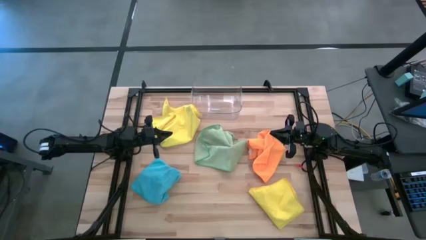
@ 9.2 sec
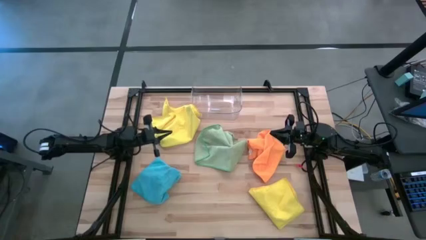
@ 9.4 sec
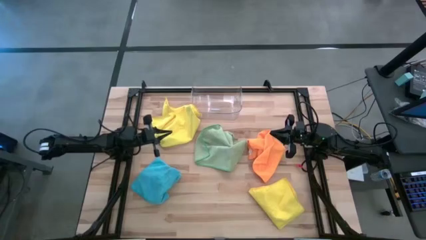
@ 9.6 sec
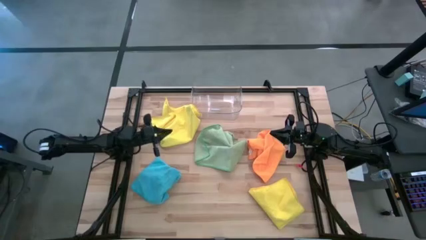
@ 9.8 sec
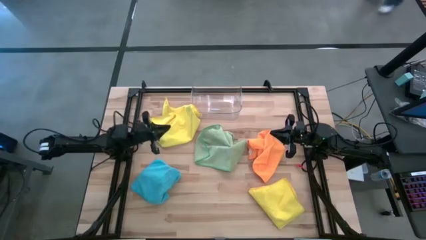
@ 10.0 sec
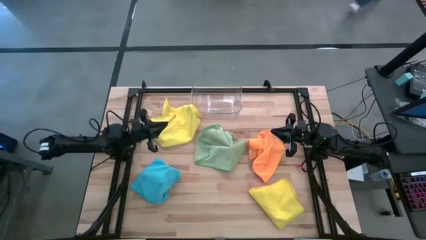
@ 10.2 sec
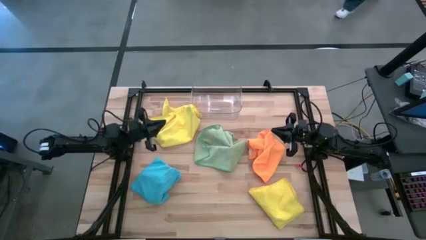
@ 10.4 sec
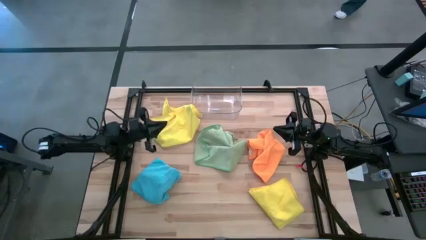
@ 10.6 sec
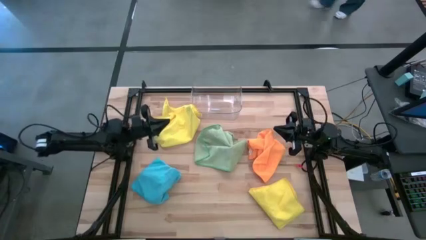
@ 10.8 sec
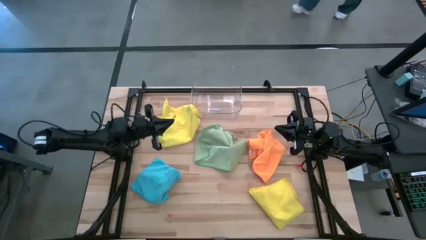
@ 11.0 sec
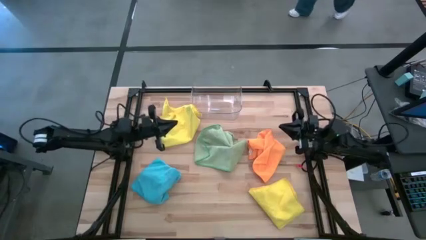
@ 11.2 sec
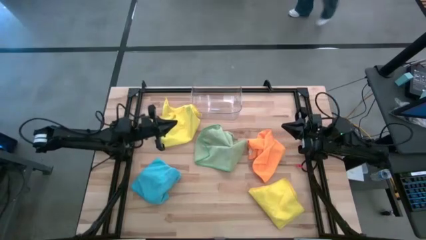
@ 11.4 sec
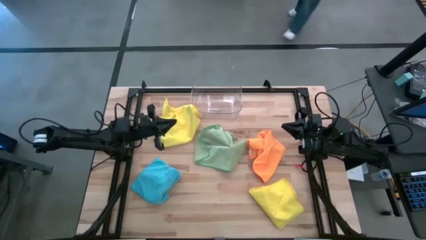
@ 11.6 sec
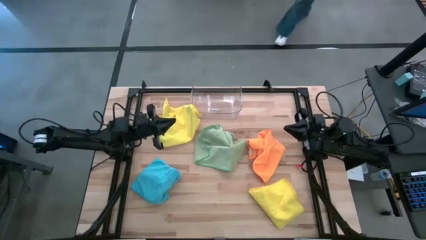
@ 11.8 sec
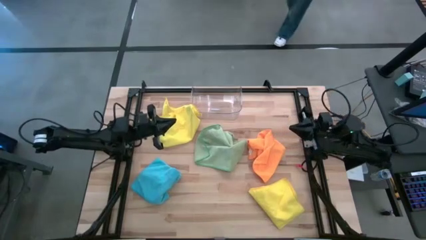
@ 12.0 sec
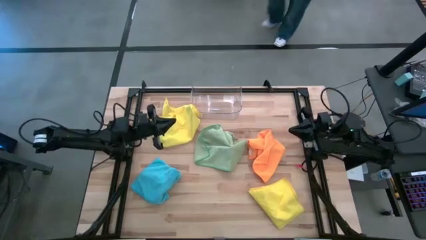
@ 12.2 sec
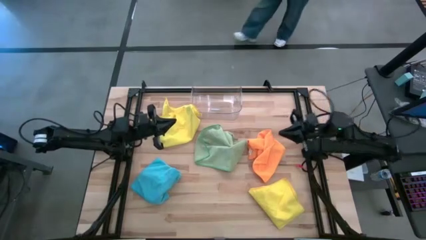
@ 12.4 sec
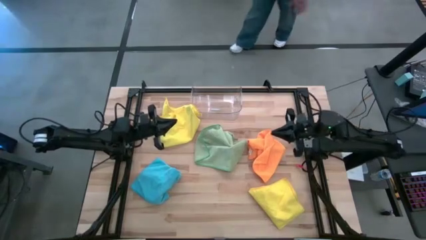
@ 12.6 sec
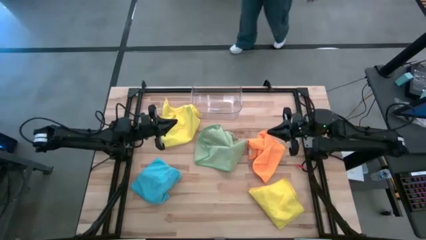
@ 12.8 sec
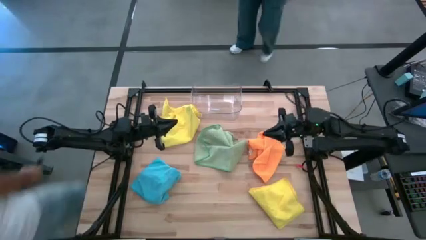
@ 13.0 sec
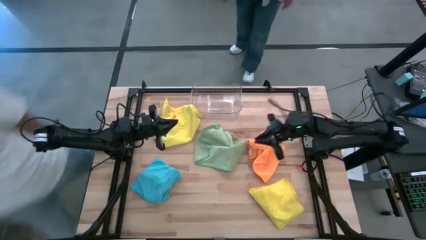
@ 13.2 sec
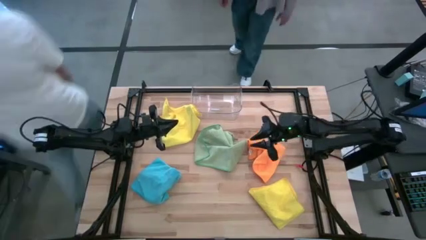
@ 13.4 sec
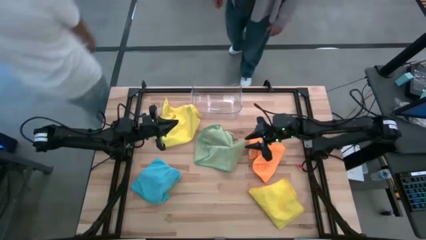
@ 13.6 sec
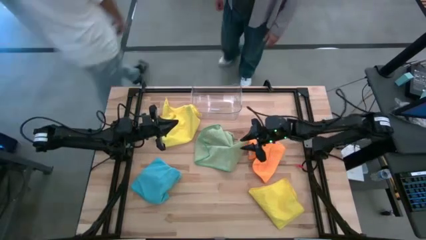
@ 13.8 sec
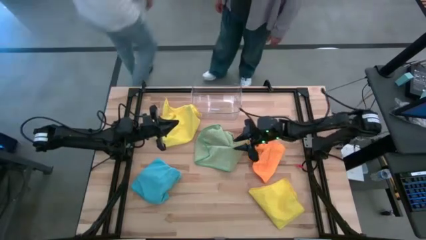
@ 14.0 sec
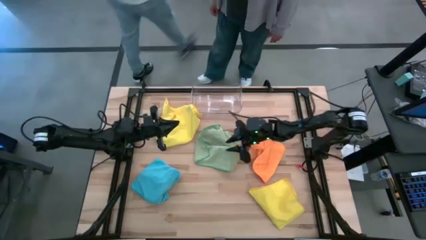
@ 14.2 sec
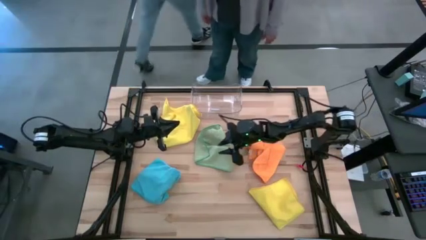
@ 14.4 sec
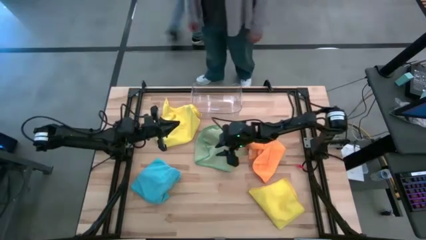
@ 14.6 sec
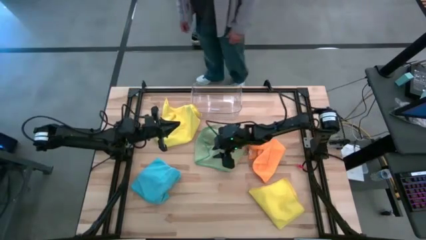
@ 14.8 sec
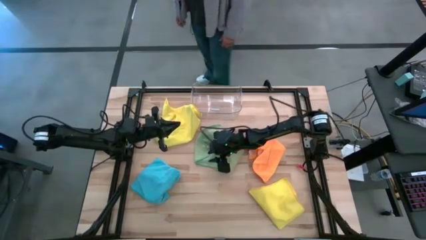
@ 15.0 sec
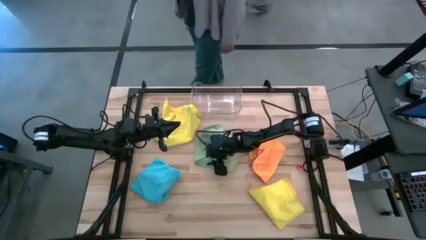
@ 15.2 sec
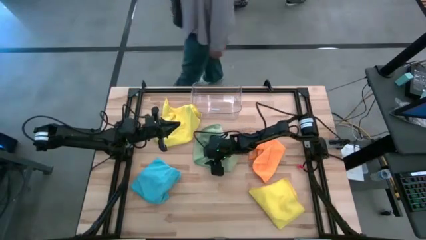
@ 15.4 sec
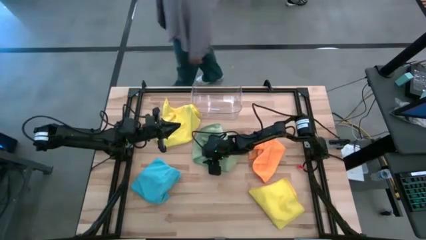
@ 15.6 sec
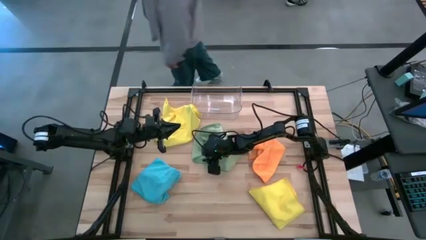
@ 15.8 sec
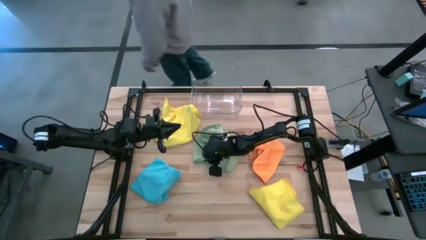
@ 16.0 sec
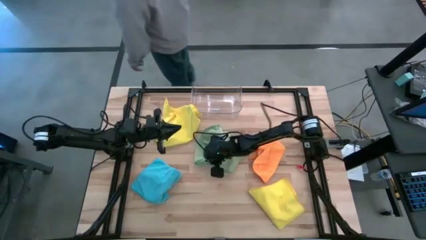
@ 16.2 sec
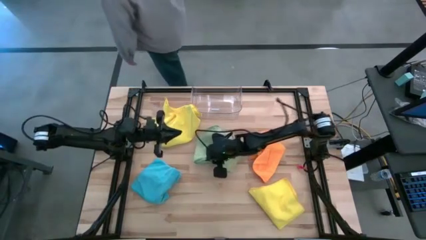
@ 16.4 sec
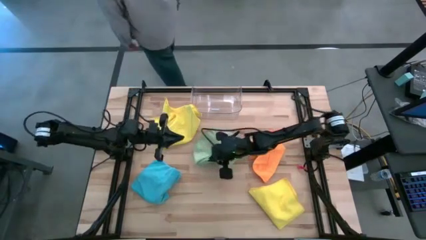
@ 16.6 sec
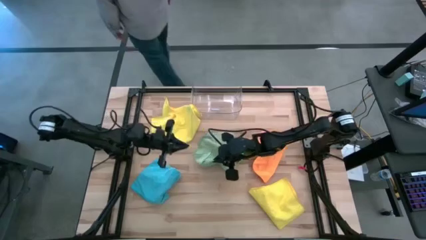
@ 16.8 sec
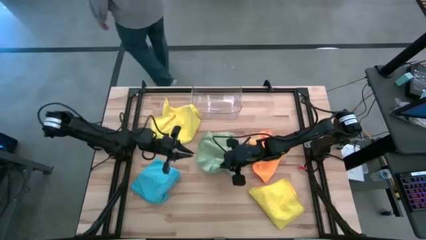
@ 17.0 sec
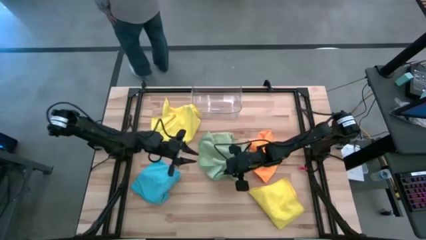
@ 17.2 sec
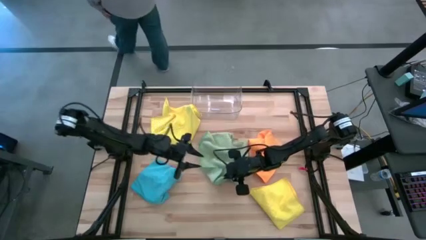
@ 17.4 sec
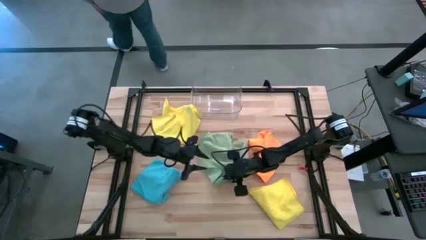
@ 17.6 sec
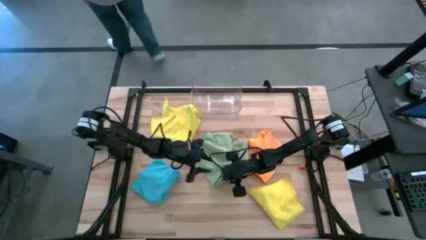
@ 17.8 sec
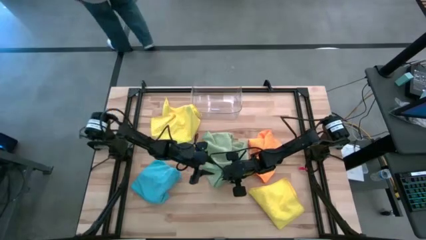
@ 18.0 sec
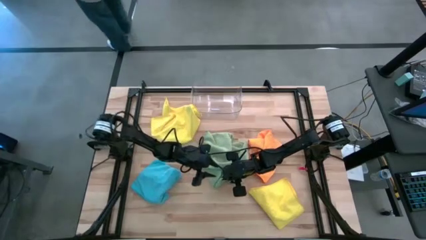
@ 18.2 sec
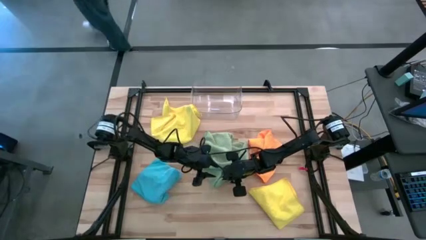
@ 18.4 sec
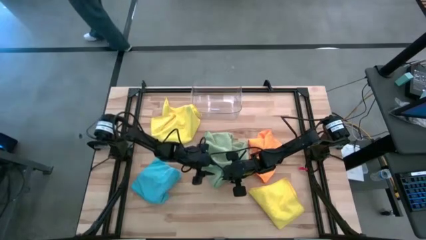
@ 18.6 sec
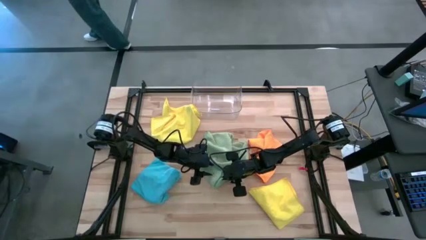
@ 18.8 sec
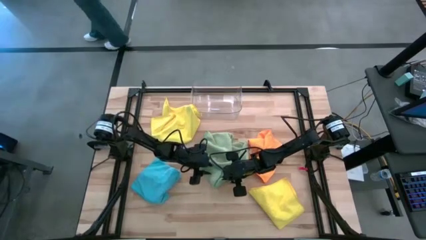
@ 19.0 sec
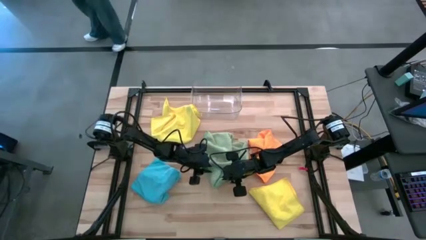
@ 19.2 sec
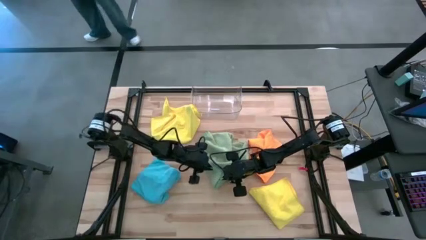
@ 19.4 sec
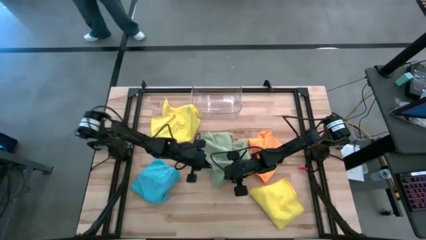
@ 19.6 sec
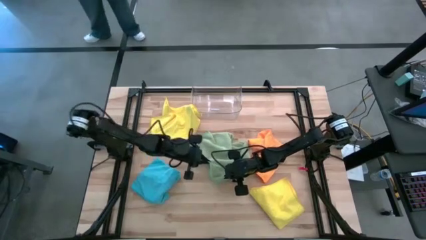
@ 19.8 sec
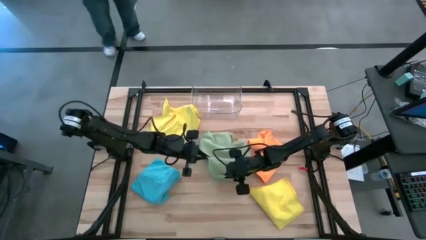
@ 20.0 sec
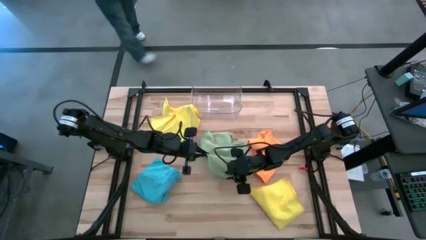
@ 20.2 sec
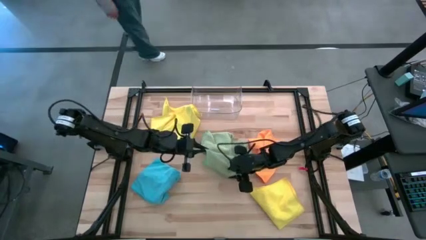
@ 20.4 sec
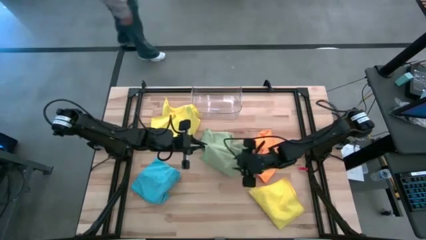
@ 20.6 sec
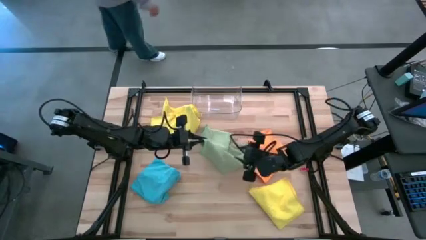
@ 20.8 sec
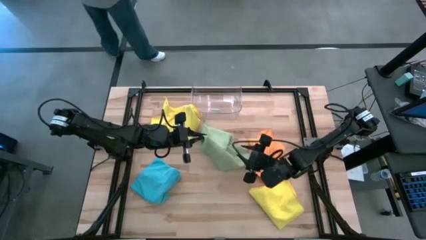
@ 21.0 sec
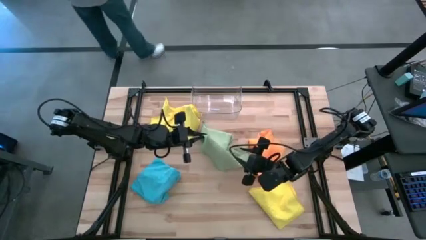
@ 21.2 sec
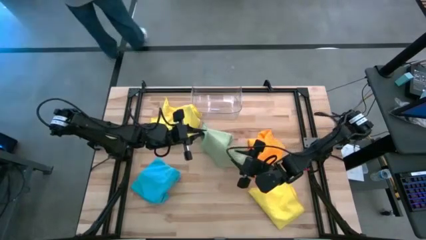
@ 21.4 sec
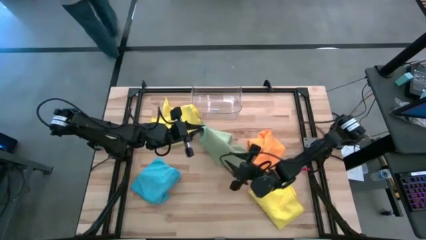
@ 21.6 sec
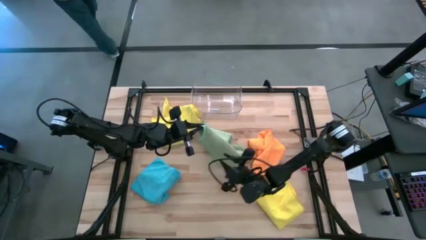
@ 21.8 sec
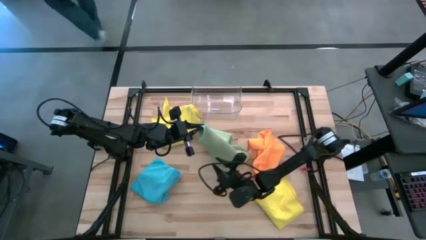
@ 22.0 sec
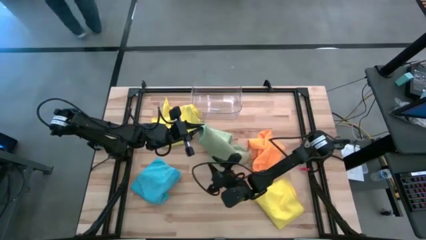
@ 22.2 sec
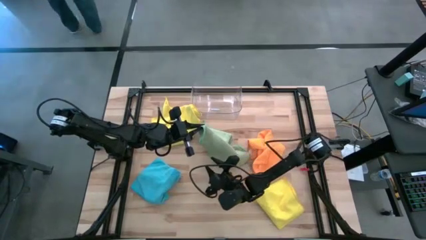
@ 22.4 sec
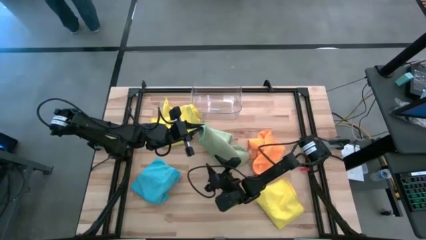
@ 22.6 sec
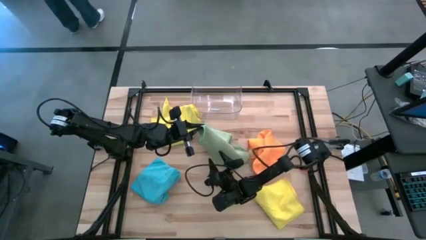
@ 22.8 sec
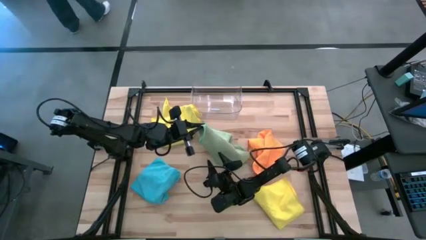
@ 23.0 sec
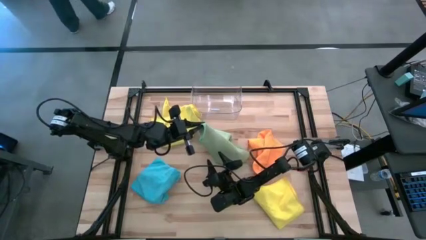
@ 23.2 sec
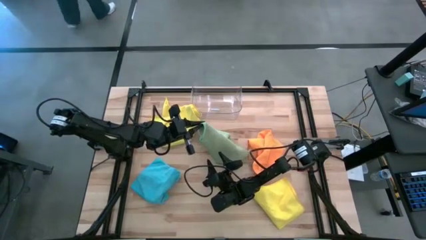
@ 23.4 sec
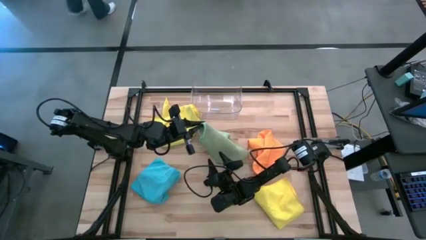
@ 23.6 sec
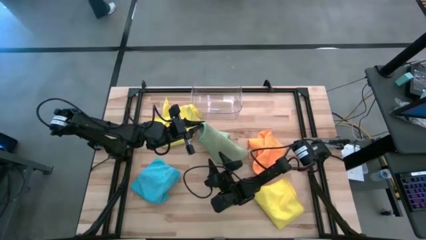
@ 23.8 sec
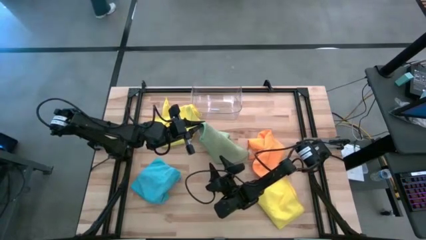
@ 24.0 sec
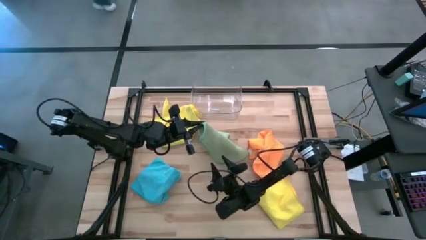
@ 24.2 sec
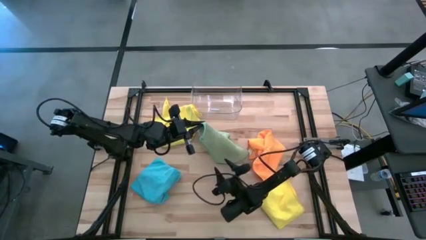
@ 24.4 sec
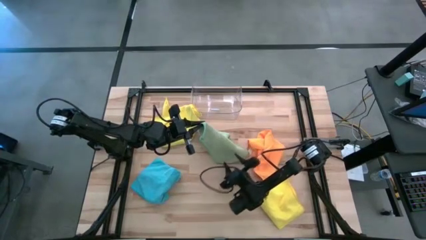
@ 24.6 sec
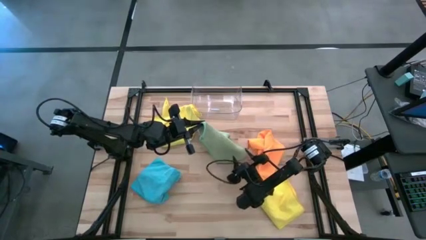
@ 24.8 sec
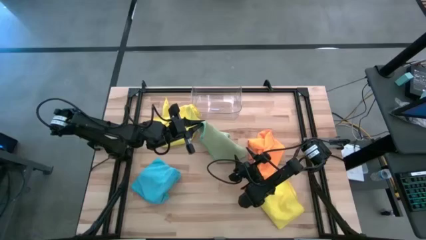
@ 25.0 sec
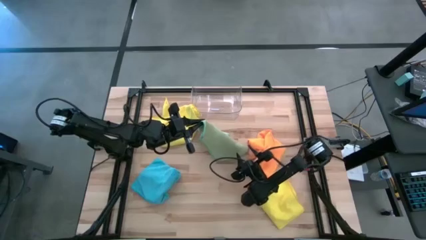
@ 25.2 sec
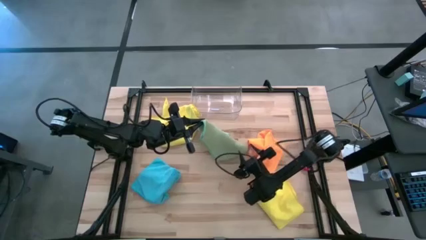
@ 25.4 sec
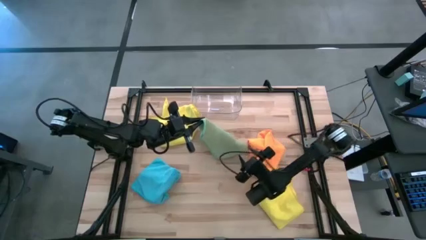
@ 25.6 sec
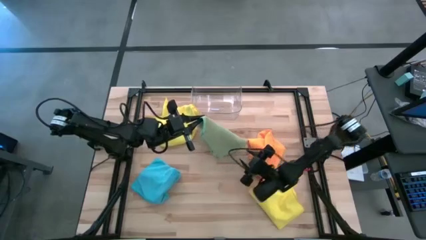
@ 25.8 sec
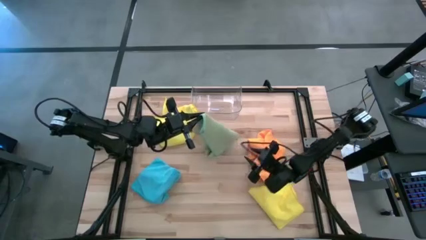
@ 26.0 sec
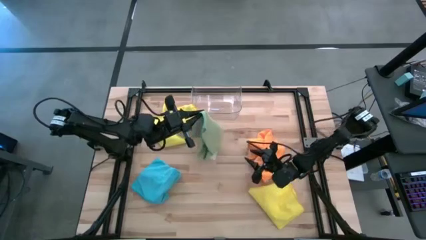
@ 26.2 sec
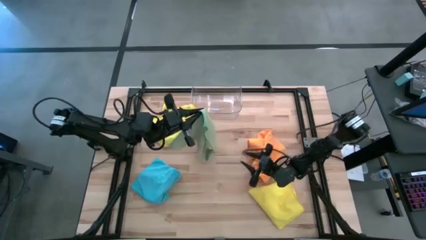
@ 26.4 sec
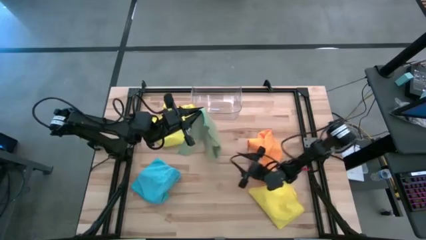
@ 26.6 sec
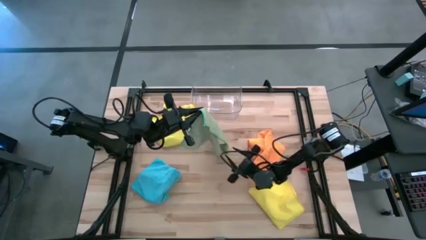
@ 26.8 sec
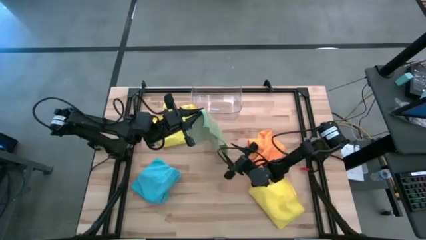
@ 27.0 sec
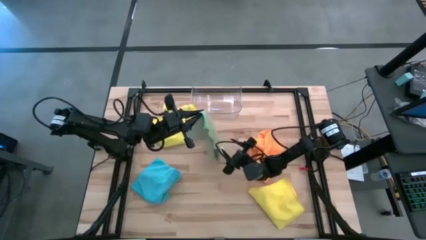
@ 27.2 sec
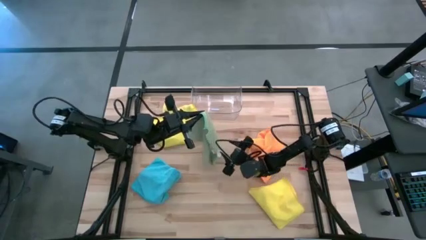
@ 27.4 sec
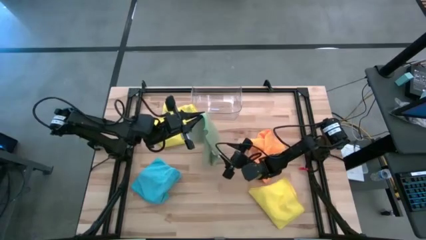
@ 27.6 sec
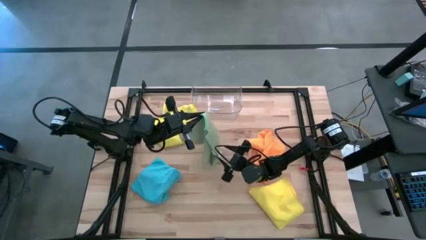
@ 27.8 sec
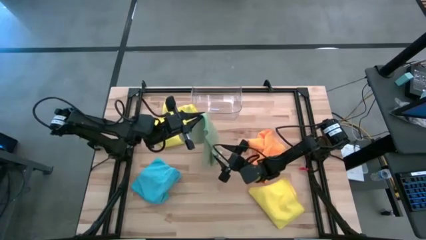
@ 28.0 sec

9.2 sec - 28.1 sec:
Task: Fold microfiber towels
Fold the light green microfiber cloth
